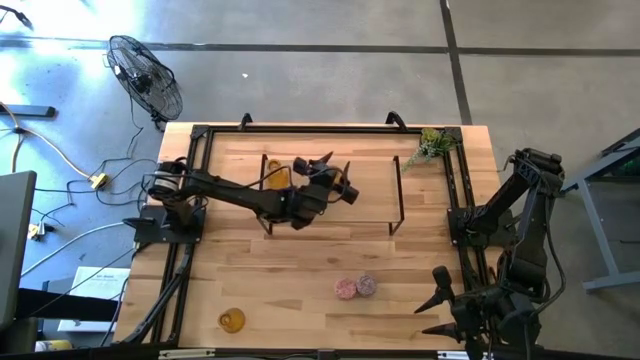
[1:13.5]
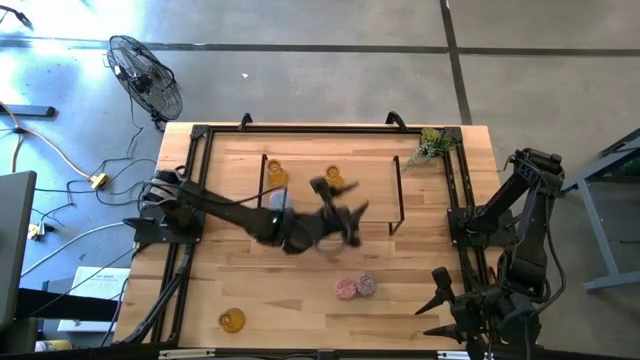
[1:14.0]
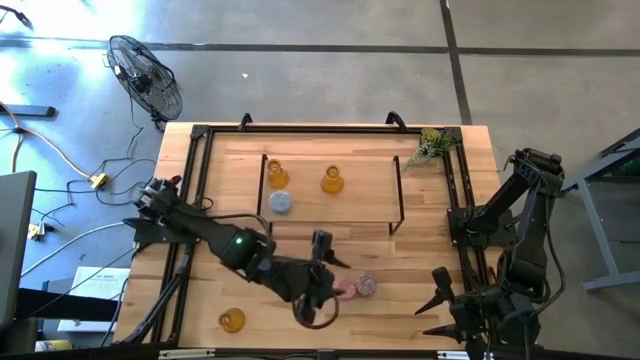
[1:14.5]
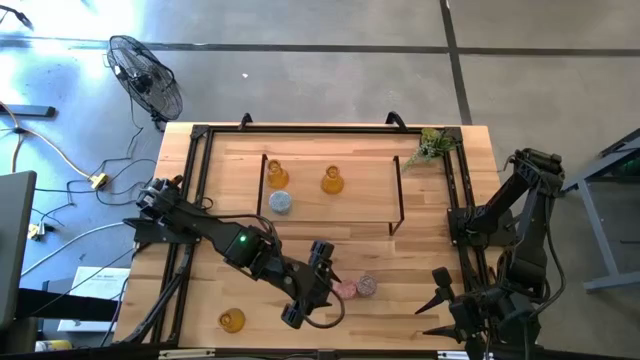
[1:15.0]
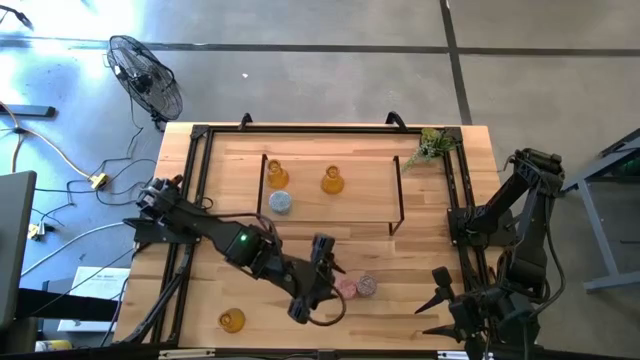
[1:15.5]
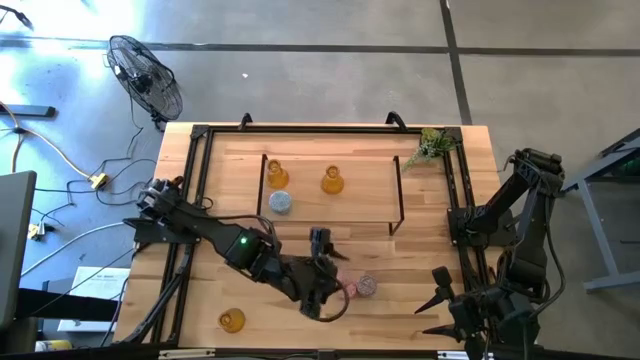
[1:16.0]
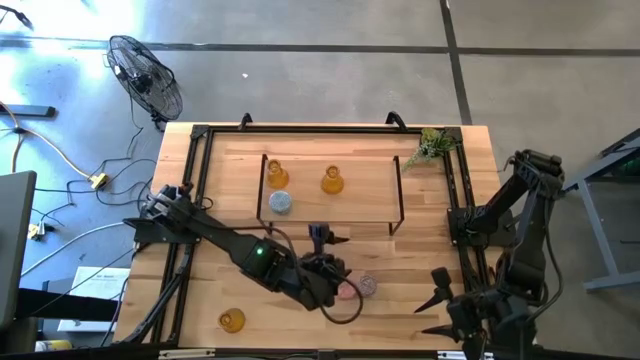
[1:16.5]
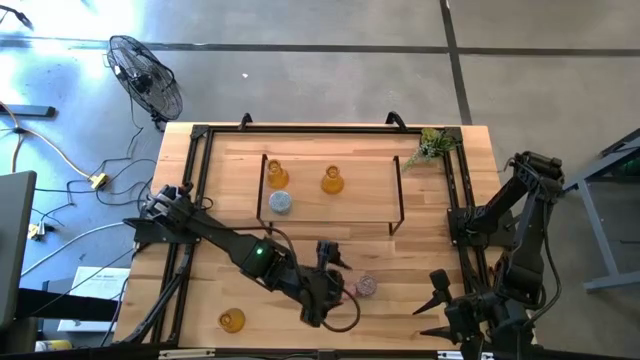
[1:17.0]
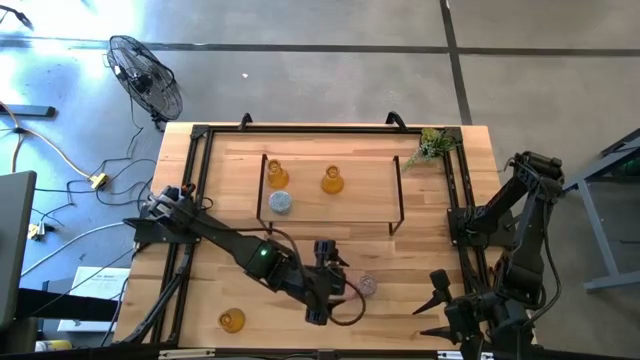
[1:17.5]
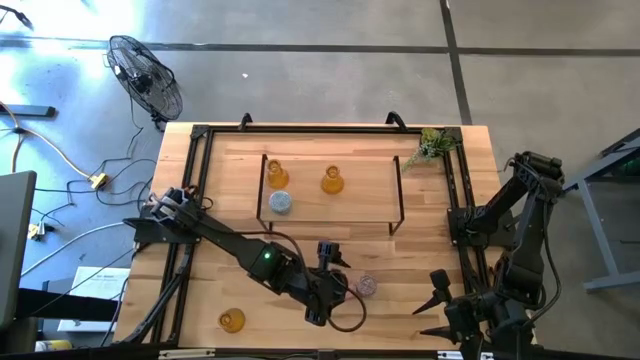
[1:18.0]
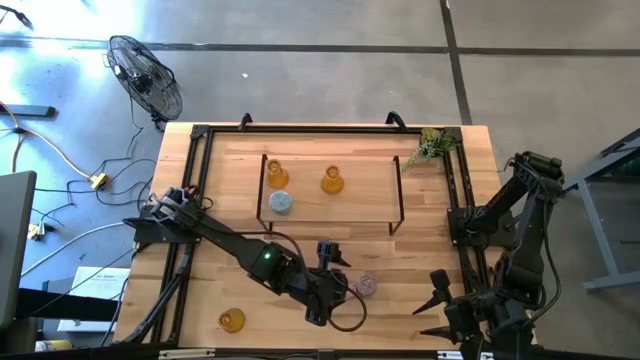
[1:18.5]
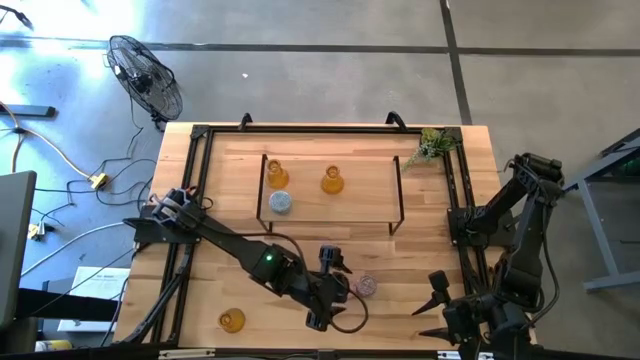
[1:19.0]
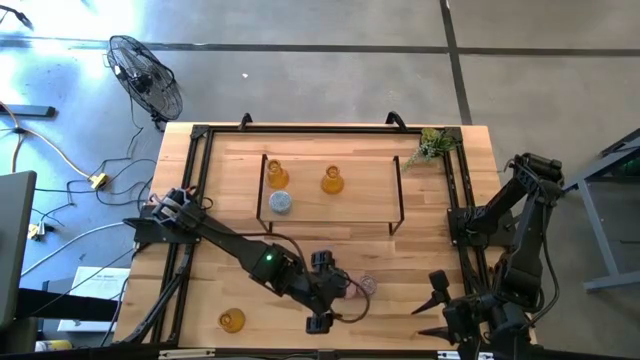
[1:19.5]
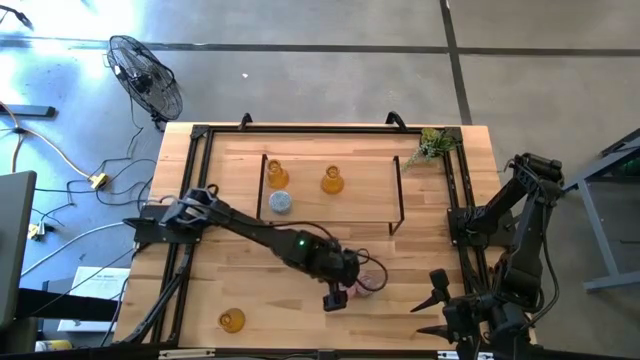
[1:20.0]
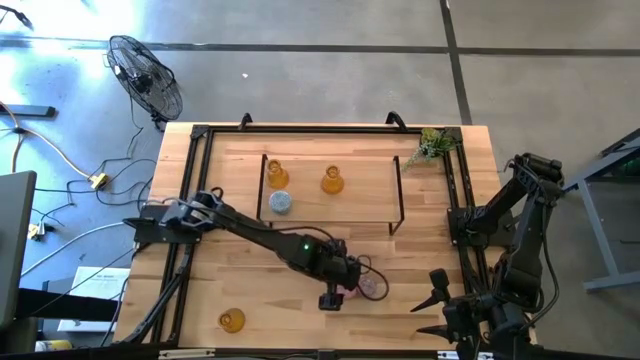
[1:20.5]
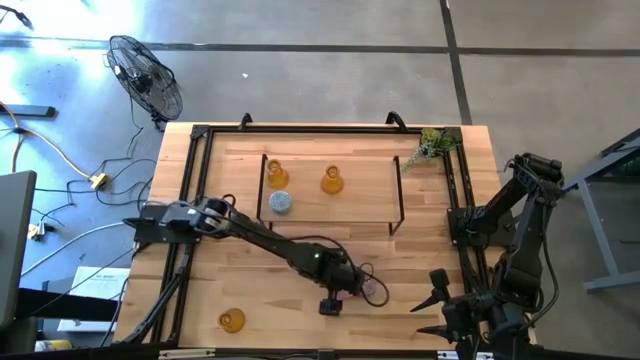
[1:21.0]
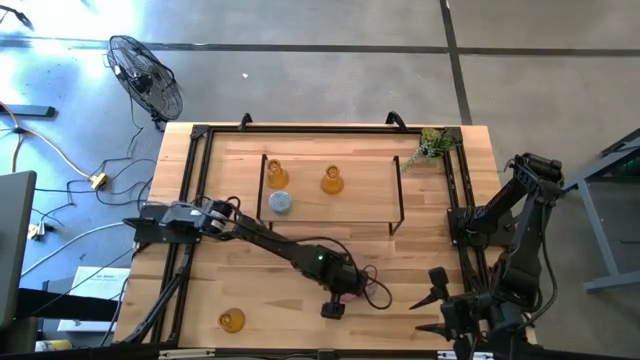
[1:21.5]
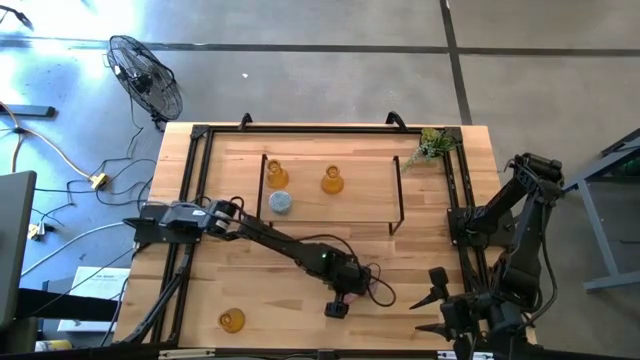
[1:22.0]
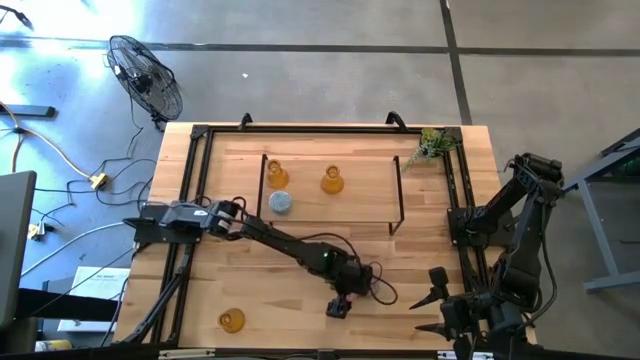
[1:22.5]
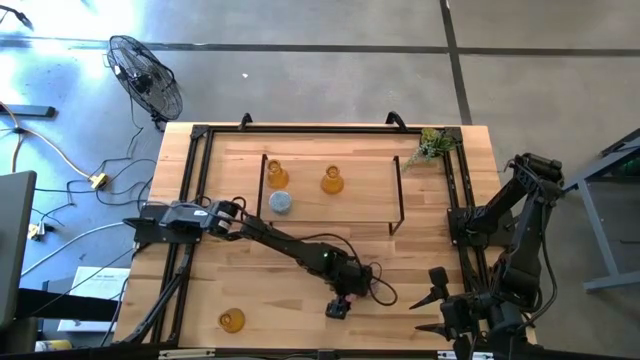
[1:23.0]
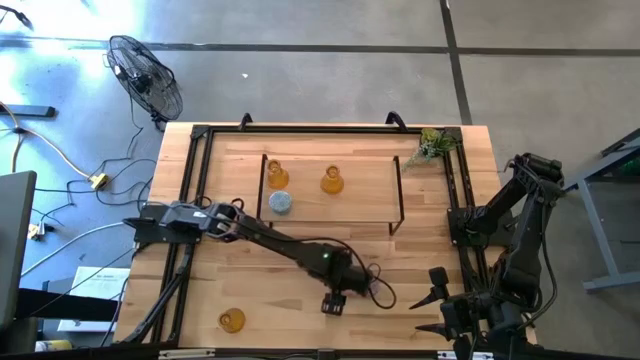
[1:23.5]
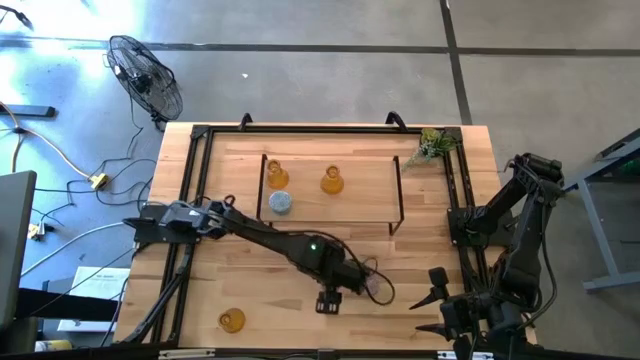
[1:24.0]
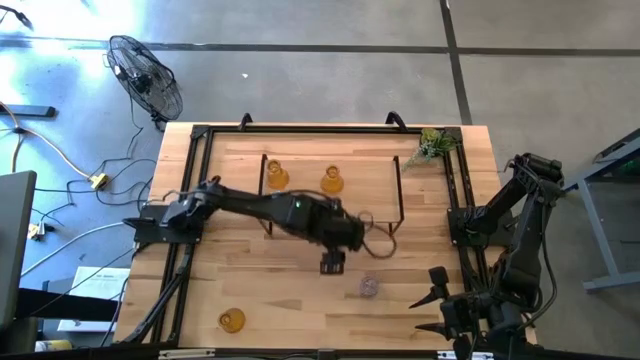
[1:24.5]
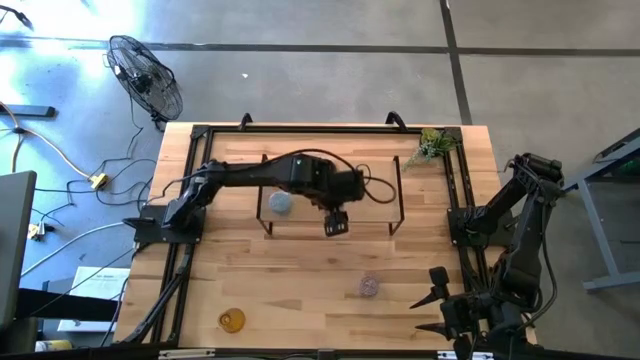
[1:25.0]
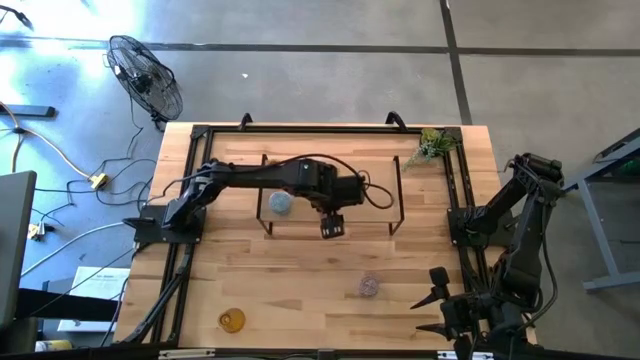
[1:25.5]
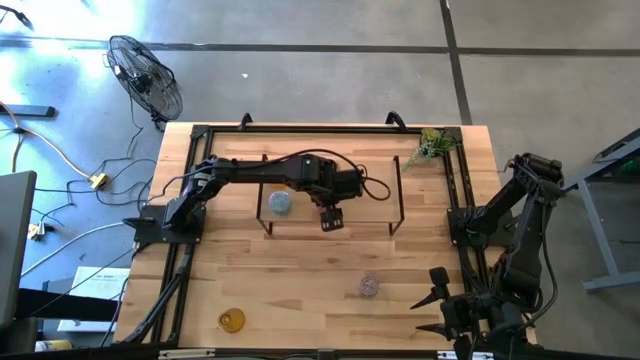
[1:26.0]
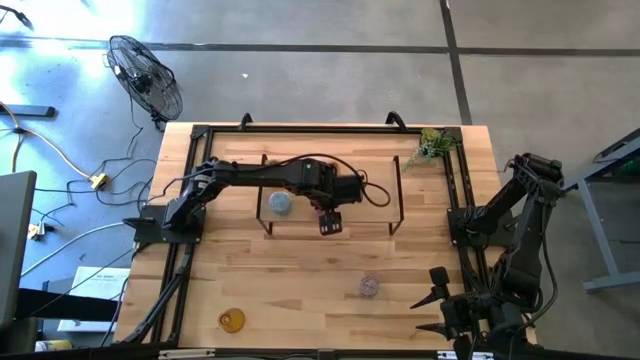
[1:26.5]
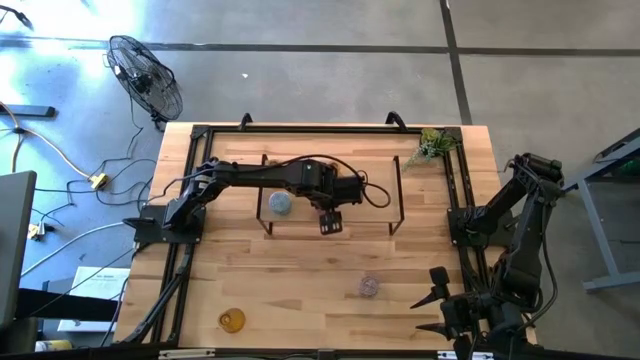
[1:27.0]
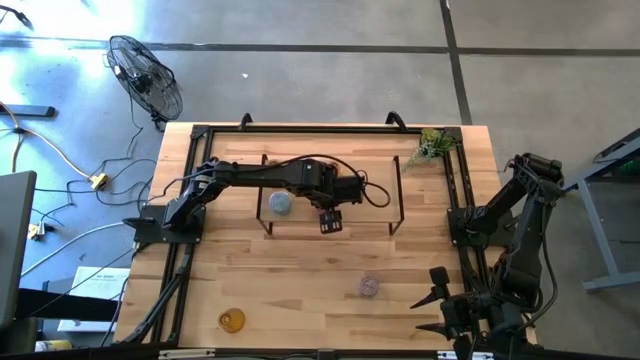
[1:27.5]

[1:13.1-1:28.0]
Task: Pick & Place candle stick holders
Put the pink scented candle on the shelf aligned with the other scented candle

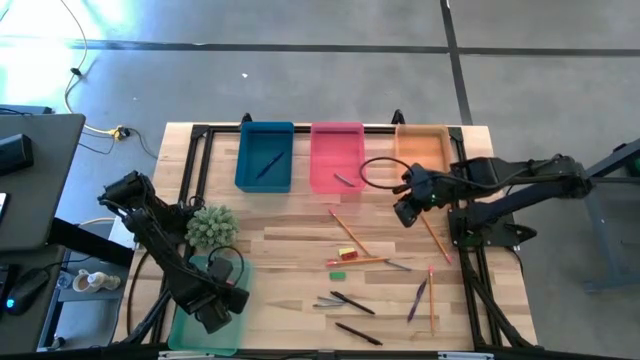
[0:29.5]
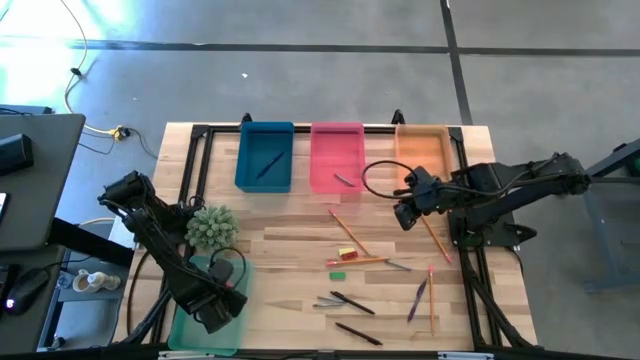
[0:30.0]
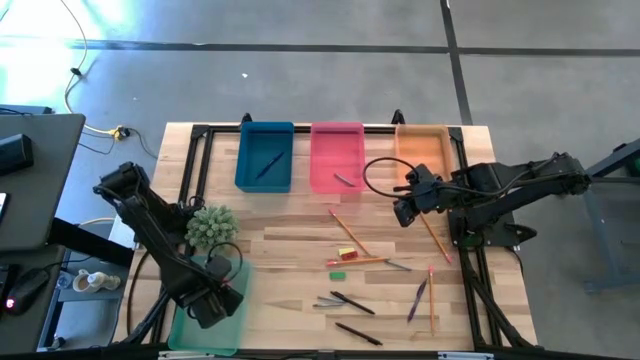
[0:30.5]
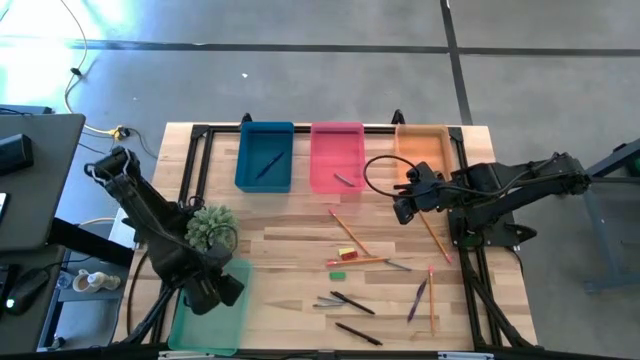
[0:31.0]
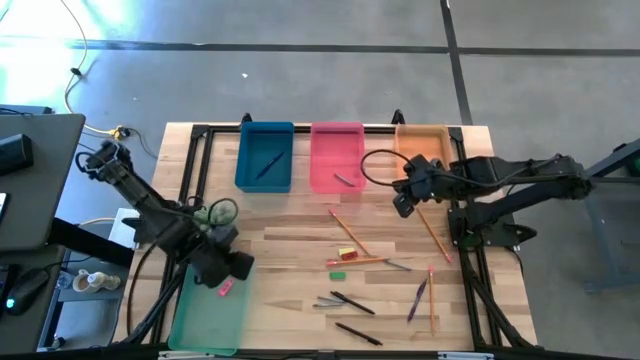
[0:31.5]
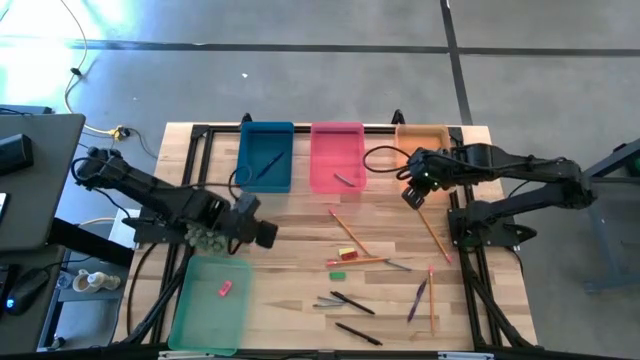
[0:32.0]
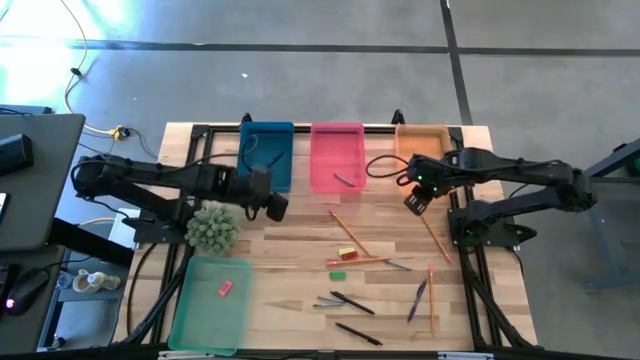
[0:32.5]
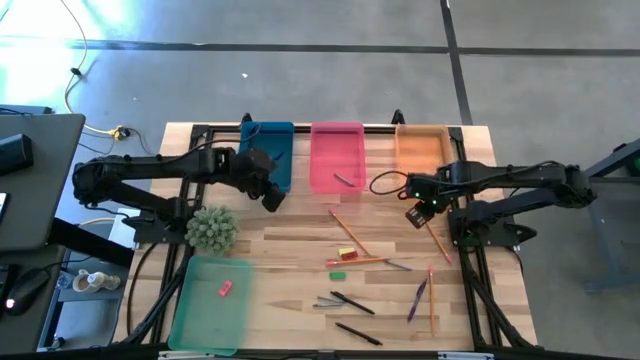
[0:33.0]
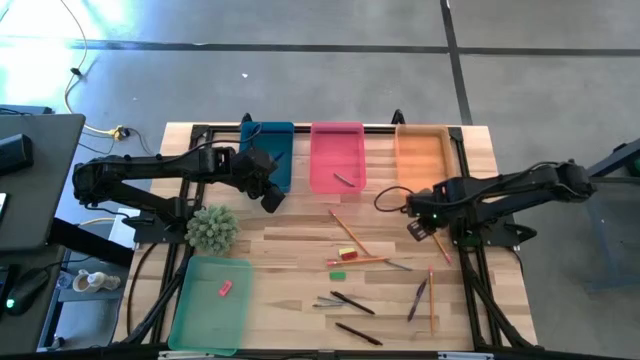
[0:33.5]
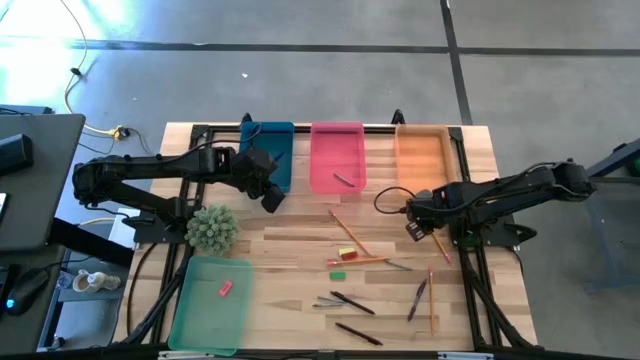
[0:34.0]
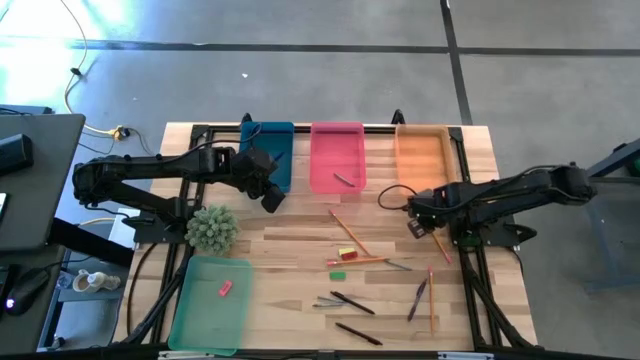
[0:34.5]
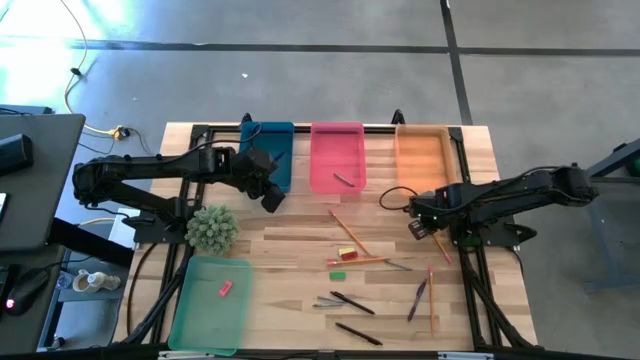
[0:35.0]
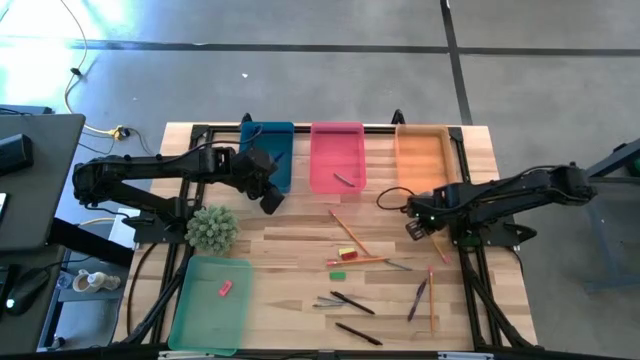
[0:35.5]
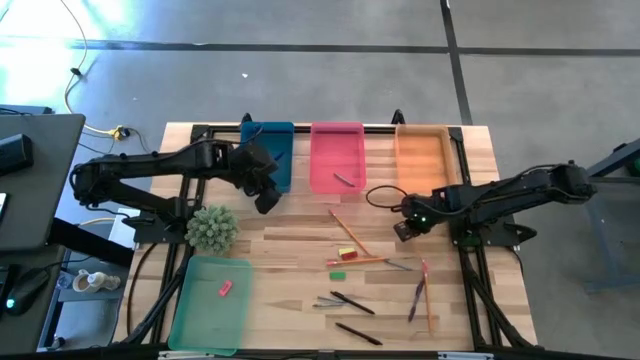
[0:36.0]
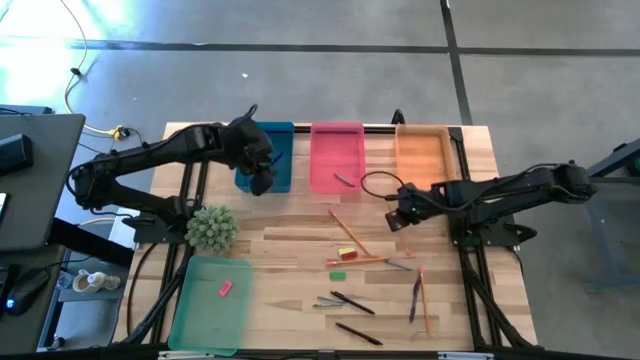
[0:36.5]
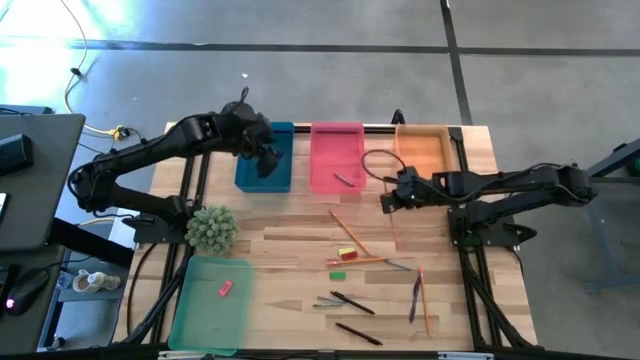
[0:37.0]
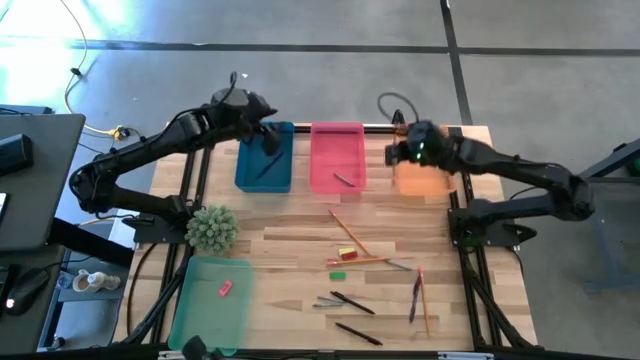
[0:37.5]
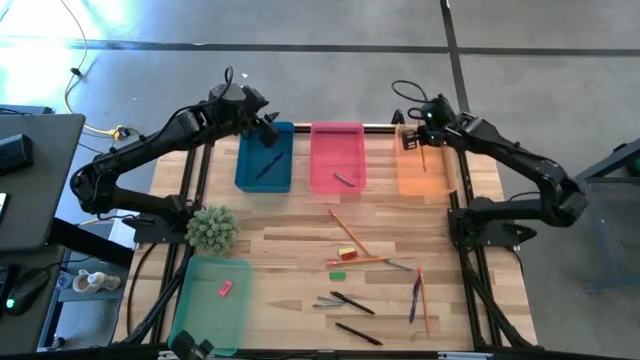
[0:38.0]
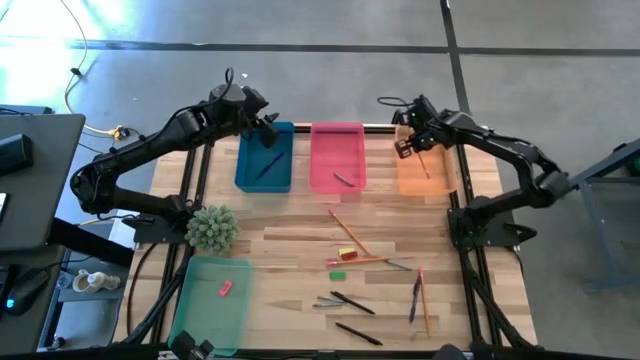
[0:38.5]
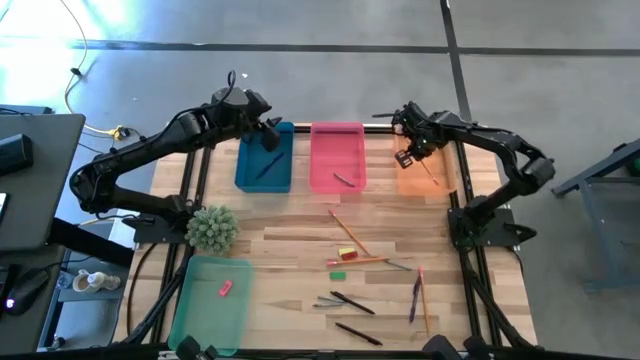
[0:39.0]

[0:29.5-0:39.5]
Task: Sort crayons/erasers/pens/pencils in bins
Put the orange pencil into the orange bin
